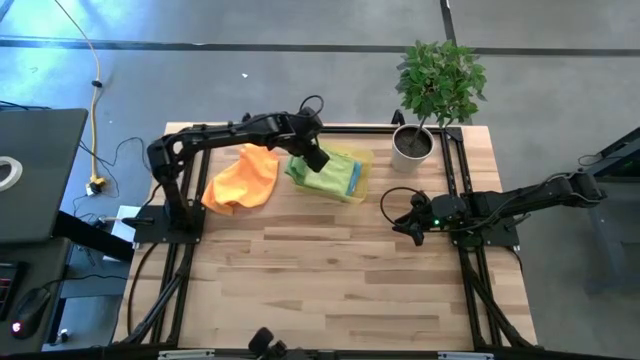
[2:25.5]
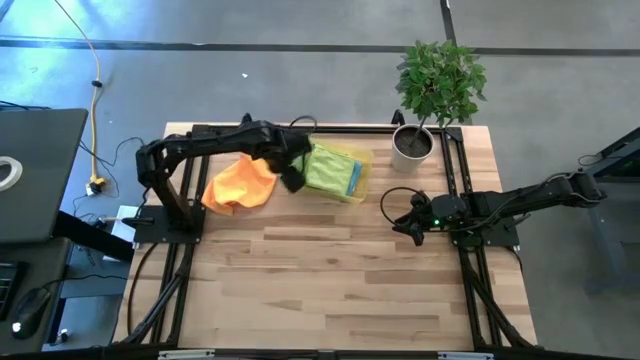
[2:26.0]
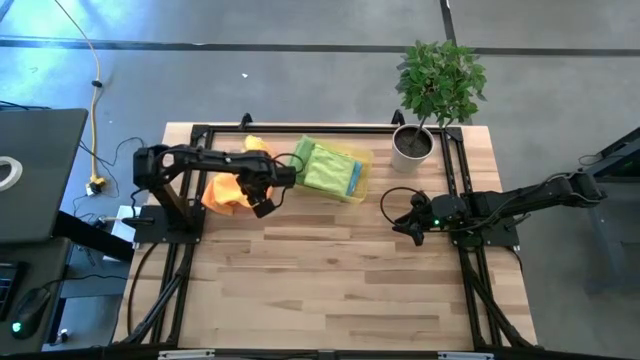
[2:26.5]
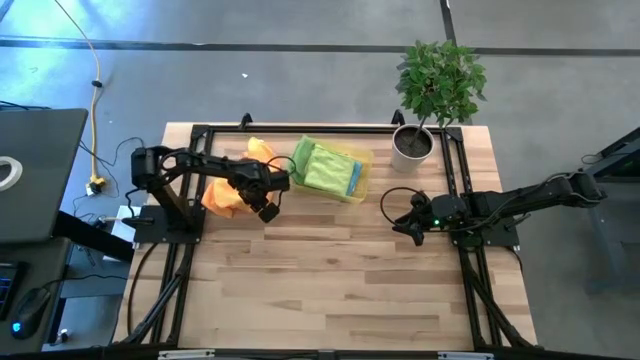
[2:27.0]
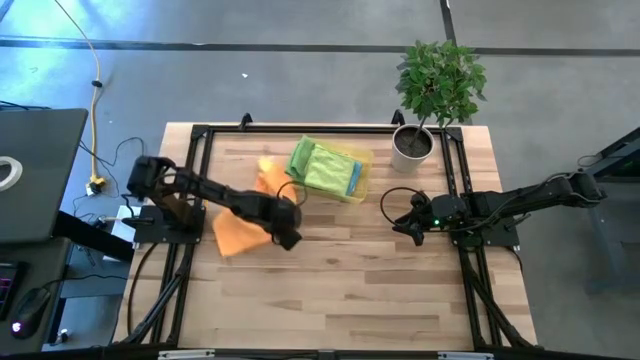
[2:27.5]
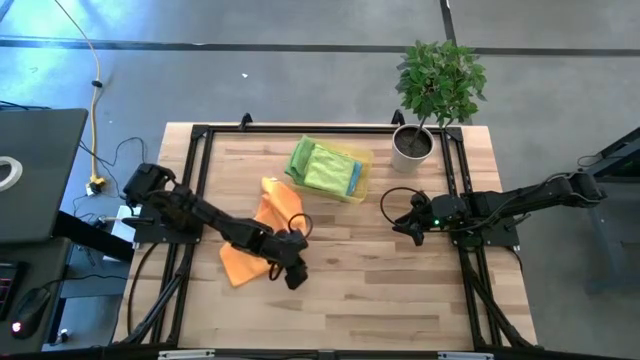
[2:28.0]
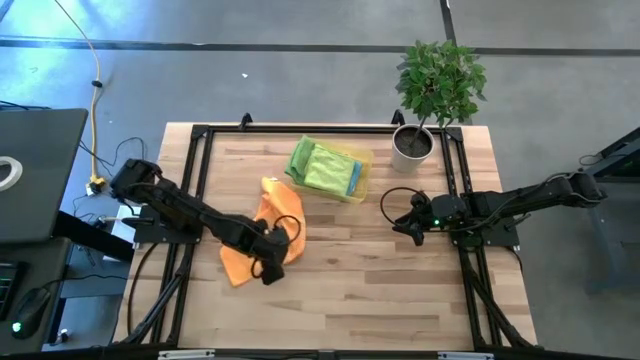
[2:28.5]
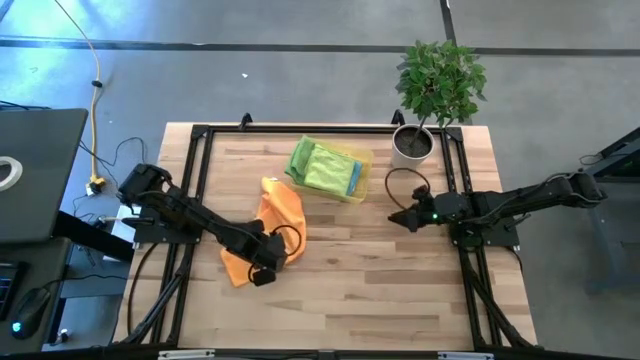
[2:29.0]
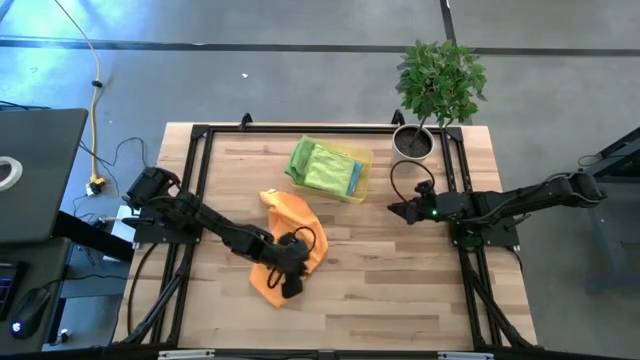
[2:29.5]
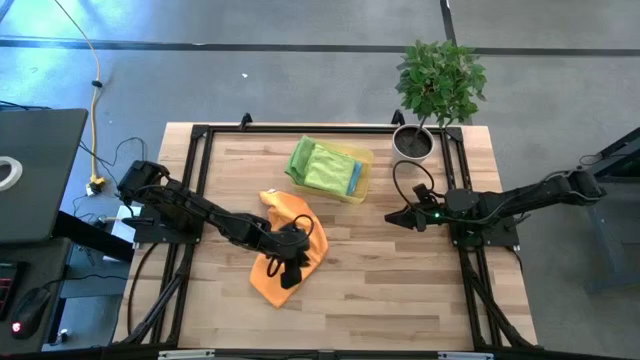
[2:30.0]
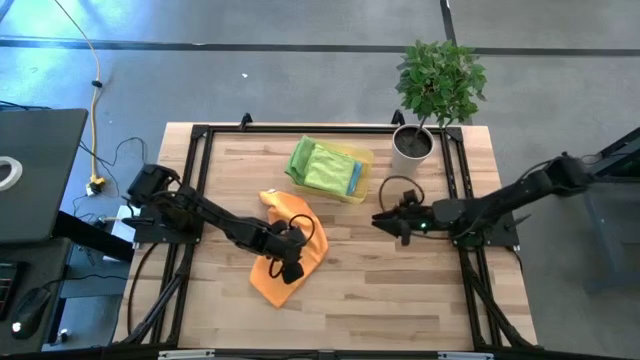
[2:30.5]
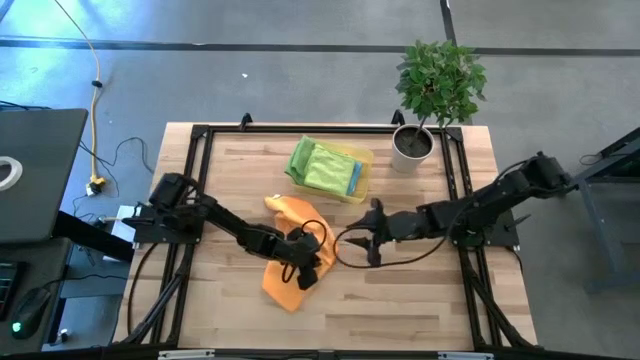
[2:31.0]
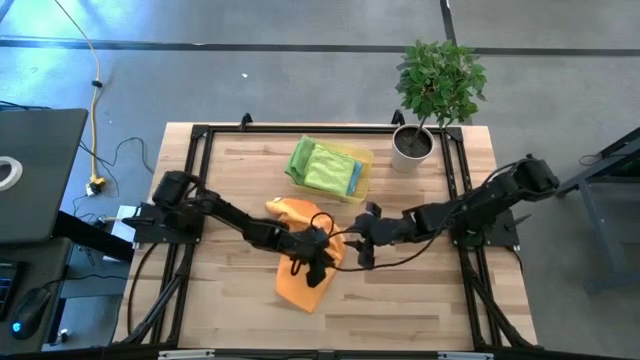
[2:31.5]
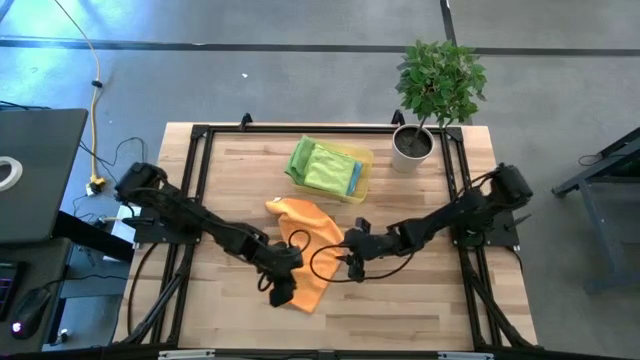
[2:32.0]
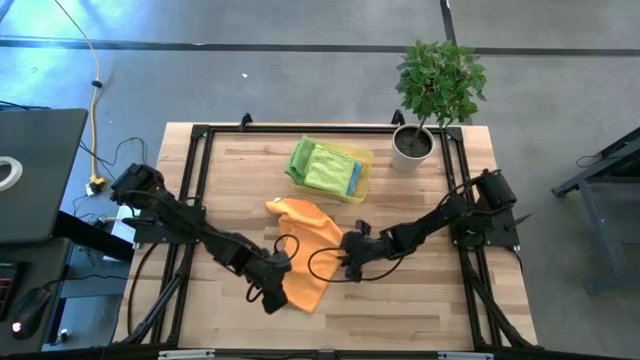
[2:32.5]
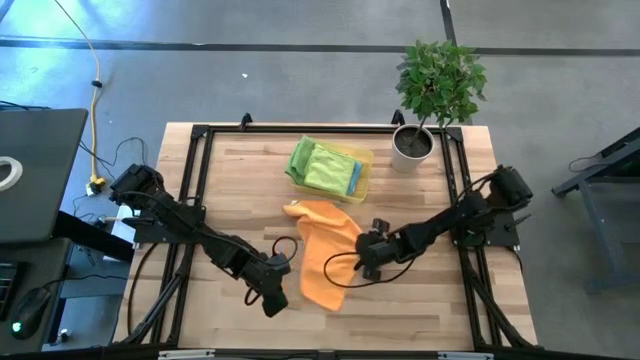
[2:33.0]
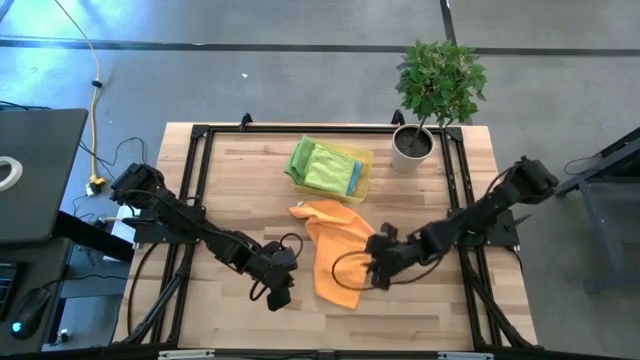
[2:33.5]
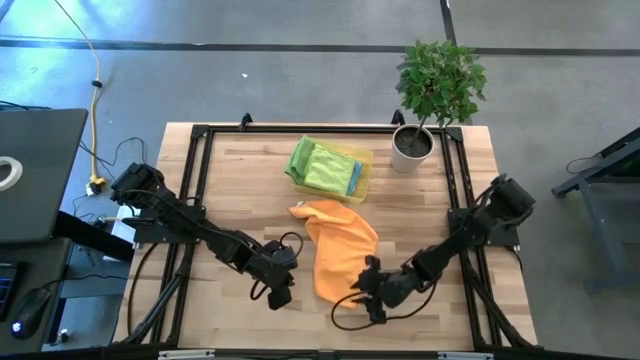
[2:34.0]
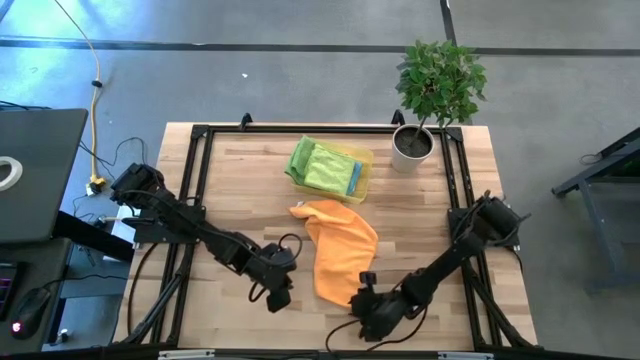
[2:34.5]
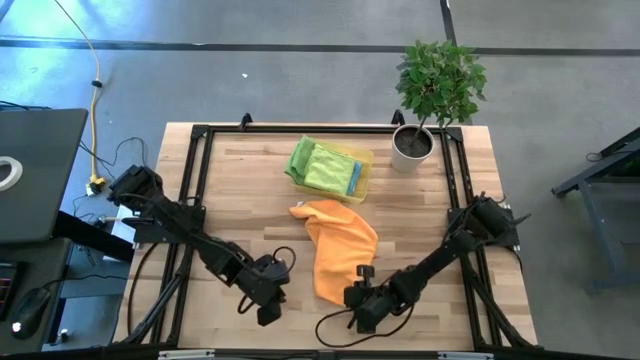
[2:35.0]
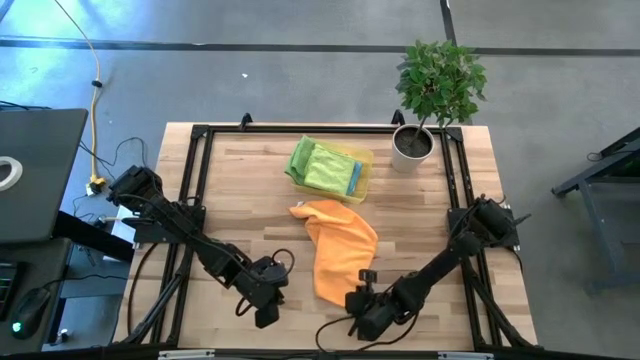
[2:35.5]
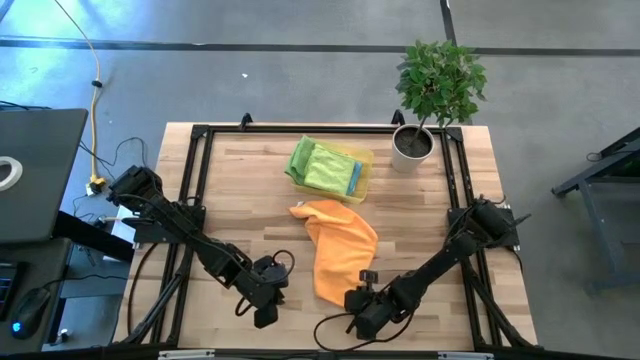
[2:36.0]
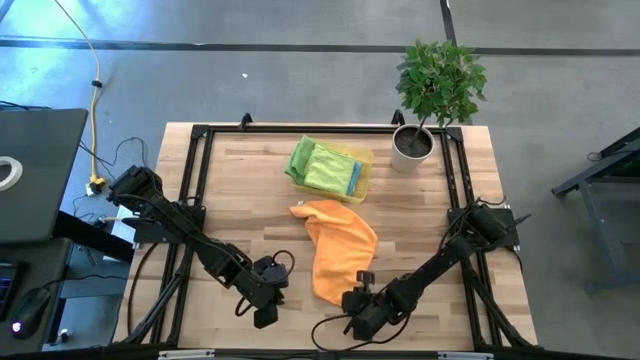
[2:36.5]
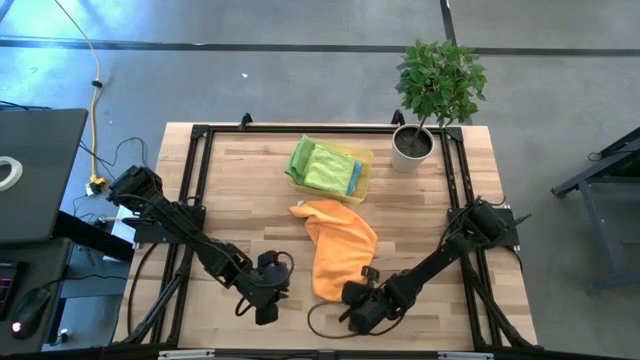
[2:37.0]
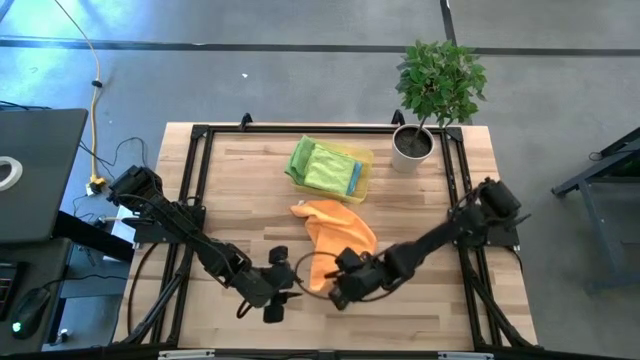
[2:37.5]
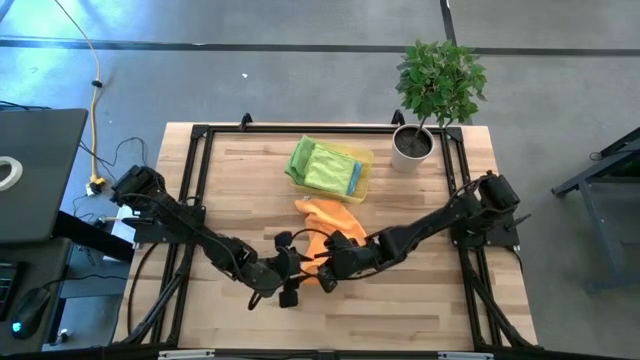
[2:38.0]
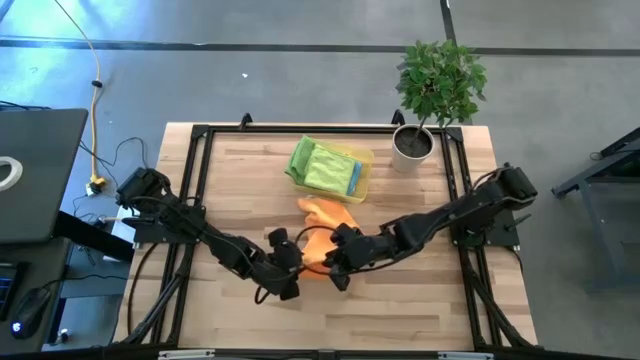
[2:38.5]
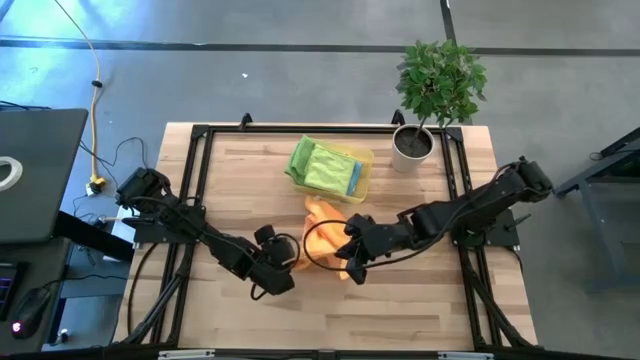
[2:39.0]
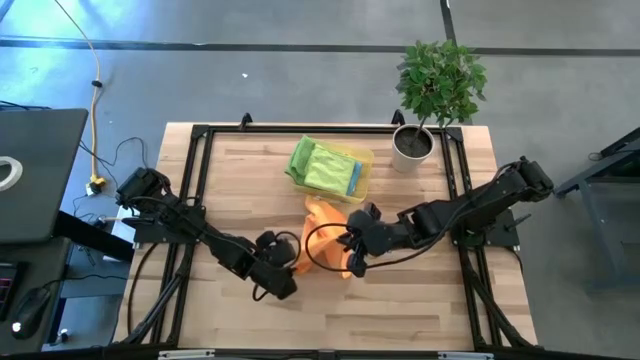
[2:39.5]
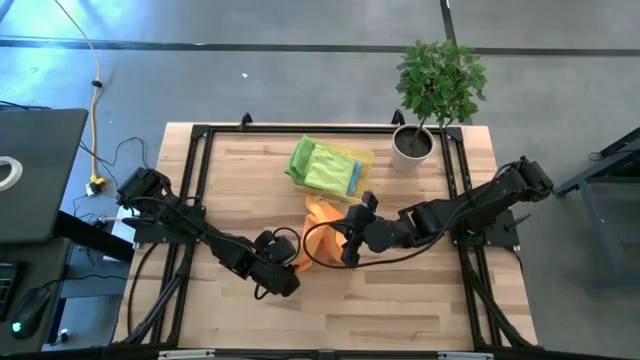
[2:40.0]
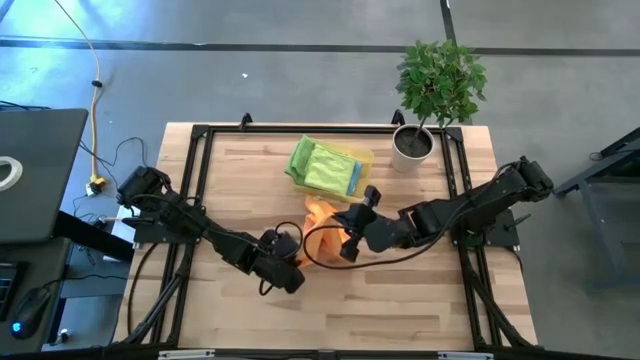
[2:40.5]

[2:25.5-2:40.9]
Task: Fold microfiber towels
Fold the orange microfiber towel

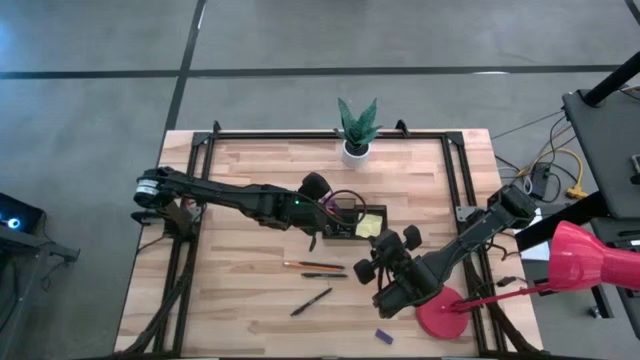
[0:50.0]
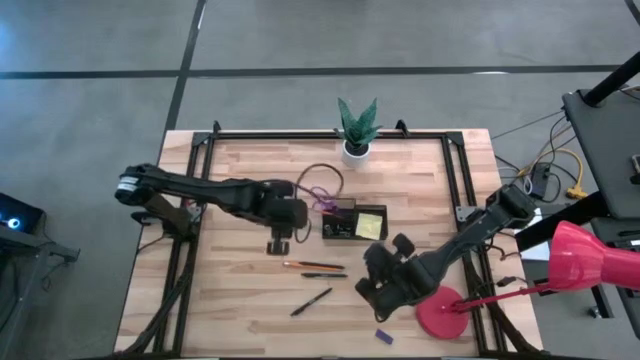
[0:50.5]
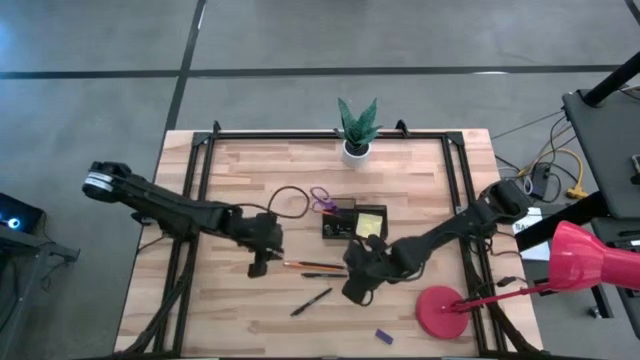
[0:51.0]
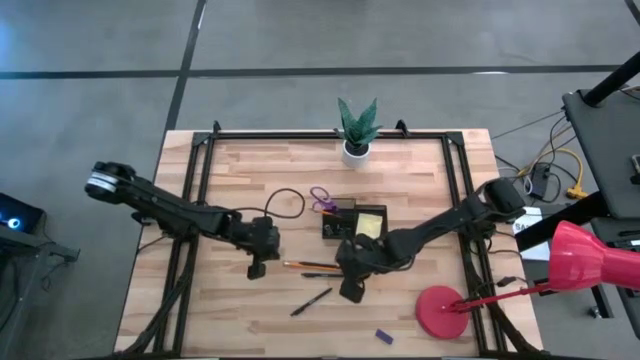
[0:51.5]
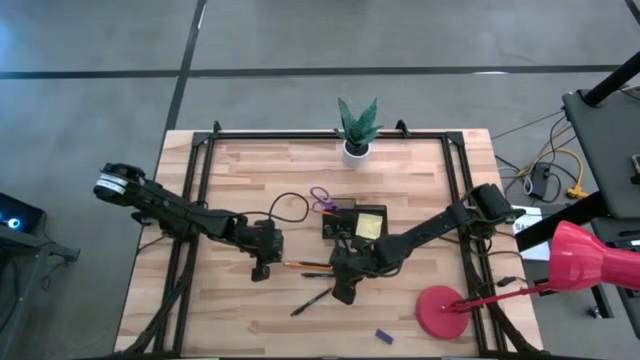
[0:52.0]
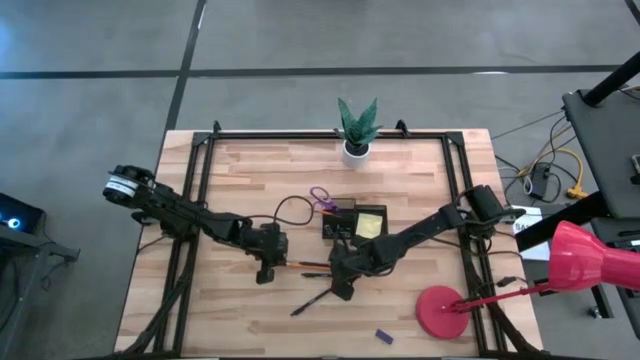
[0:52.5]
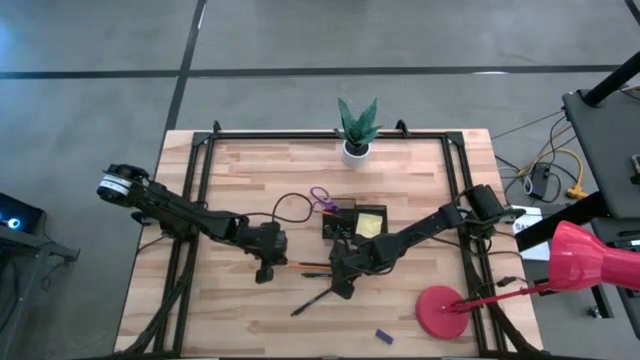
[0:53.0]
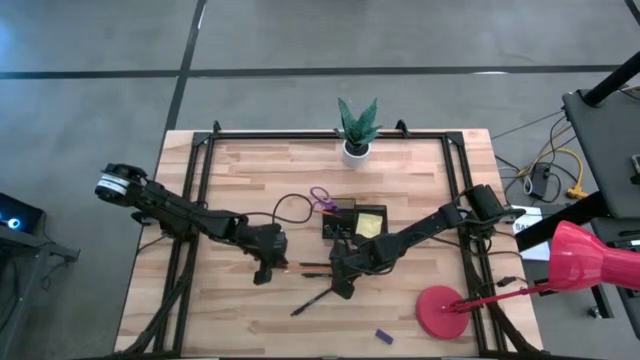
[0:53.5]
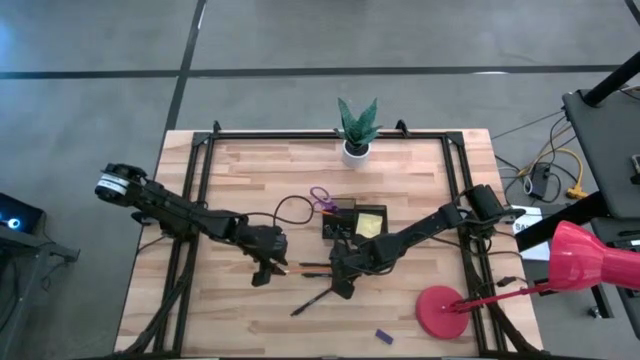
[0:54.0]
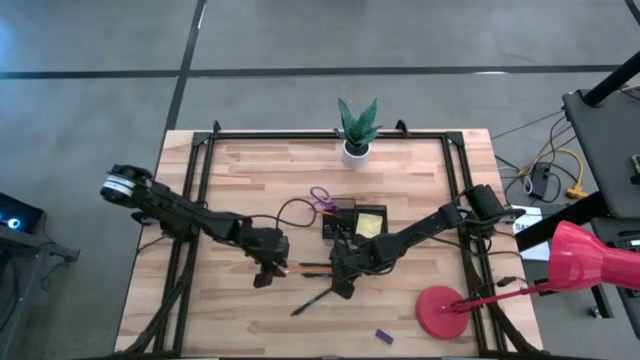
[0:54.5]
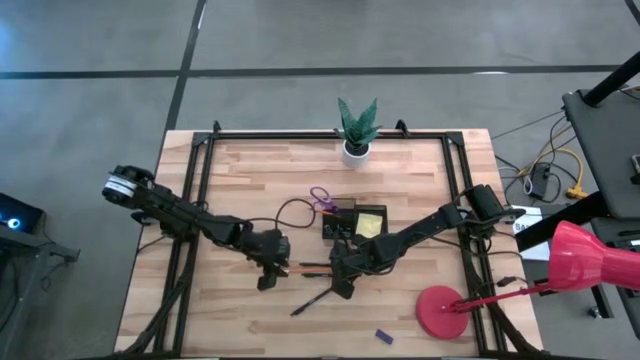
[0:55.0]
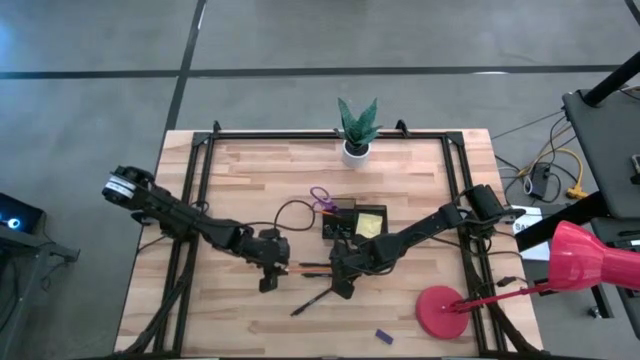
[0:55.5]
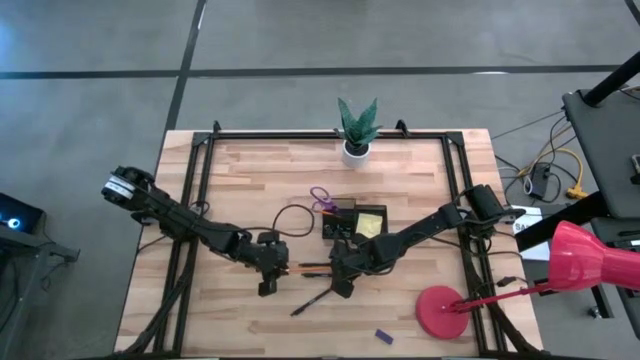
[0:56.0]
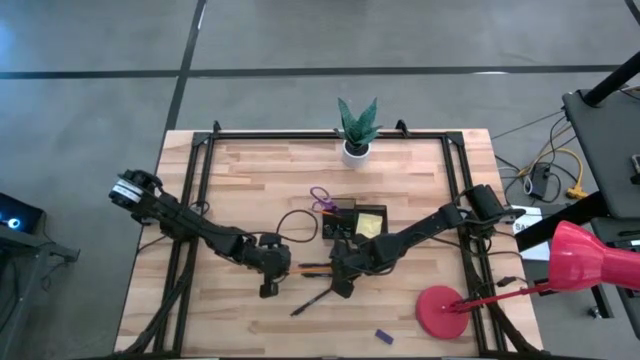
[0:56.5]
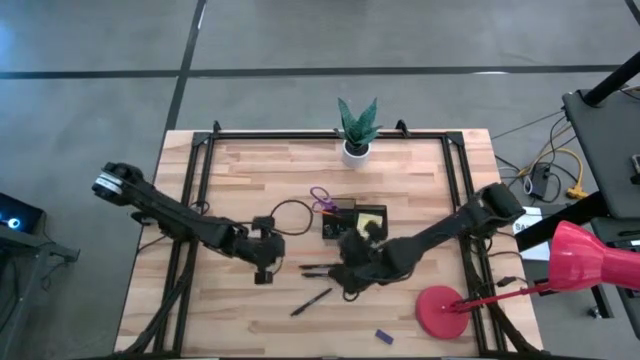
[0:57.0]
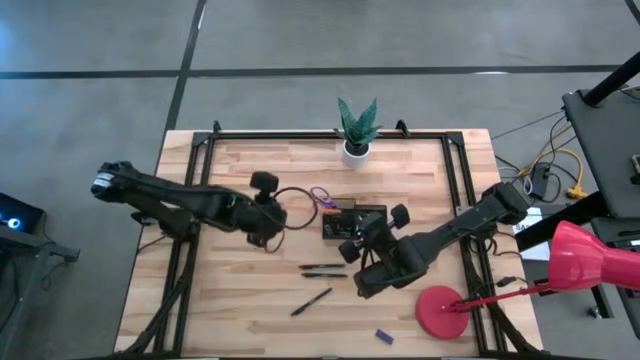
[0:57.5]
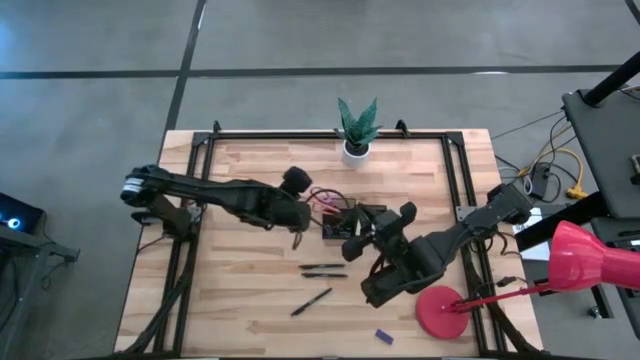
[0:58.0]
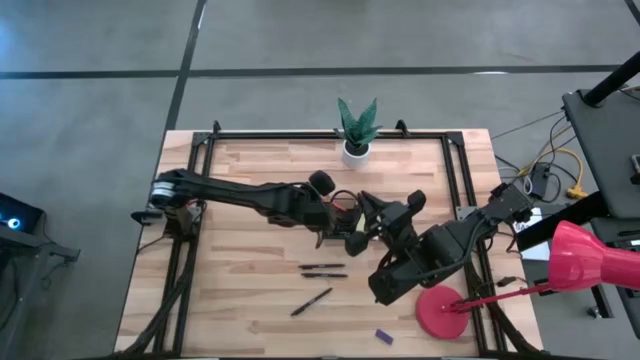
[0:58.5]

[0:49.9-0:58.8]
Task: Pick and place office supplies into organizer
Put the orange pencil into the black organizer
